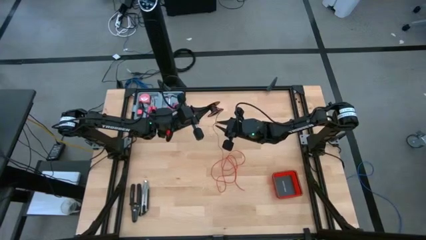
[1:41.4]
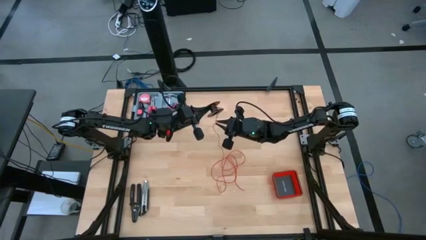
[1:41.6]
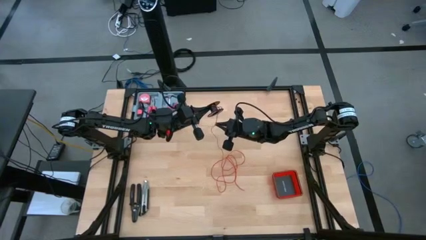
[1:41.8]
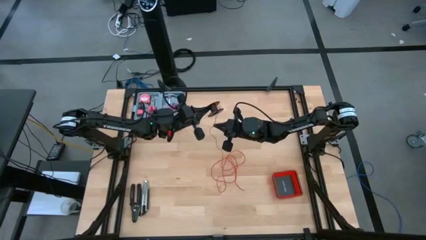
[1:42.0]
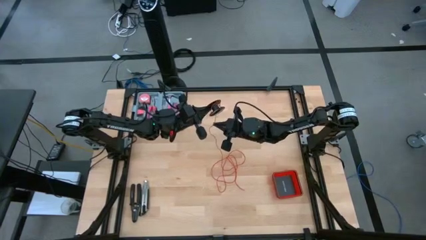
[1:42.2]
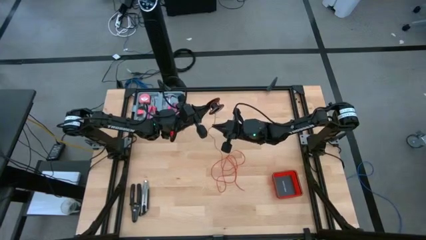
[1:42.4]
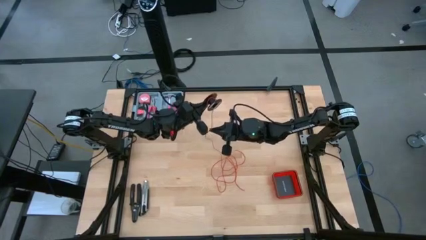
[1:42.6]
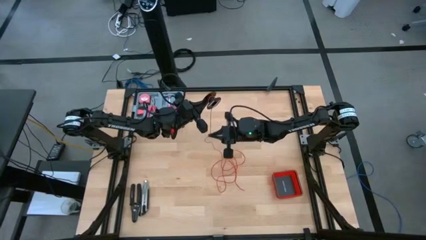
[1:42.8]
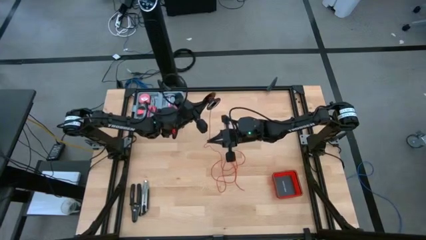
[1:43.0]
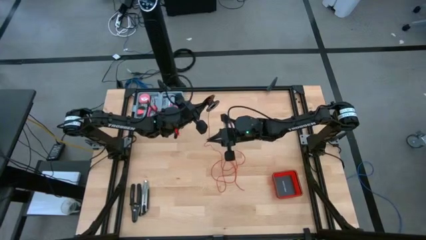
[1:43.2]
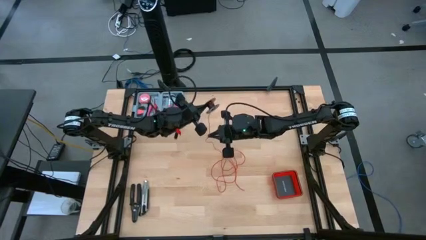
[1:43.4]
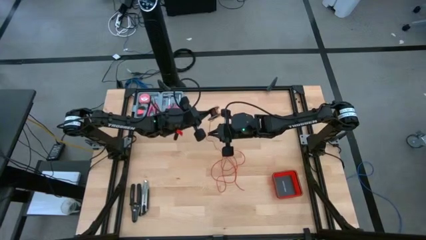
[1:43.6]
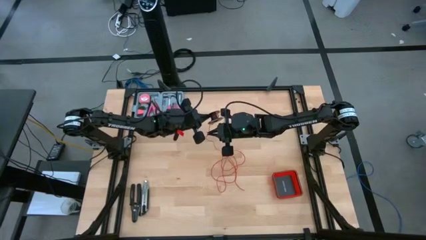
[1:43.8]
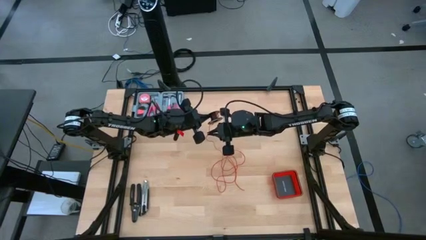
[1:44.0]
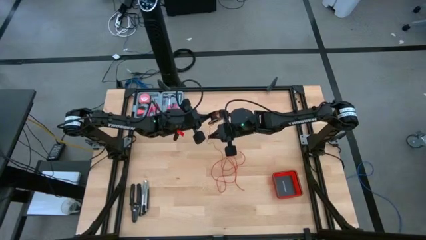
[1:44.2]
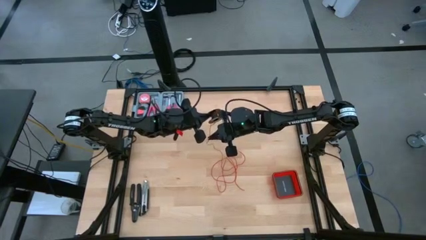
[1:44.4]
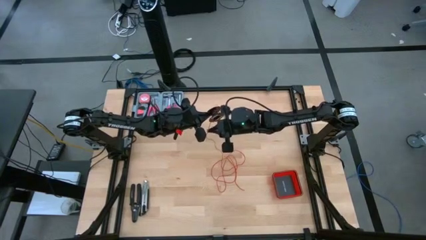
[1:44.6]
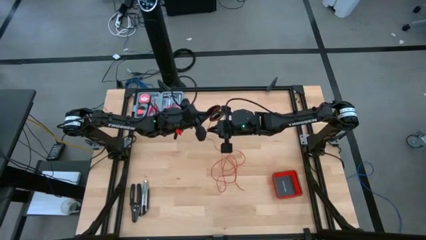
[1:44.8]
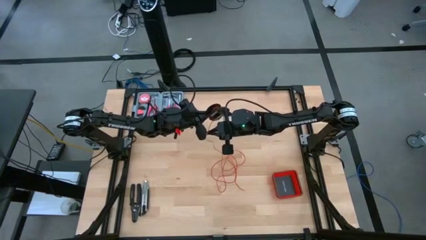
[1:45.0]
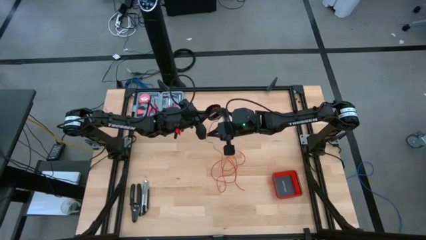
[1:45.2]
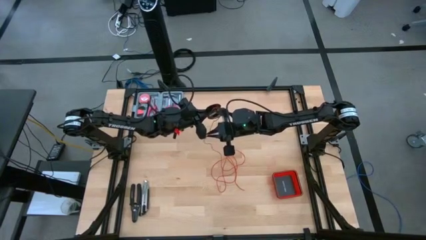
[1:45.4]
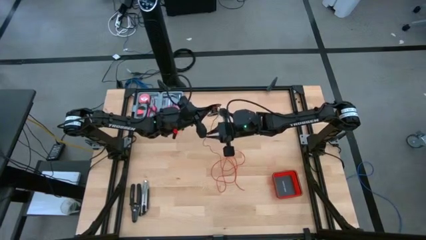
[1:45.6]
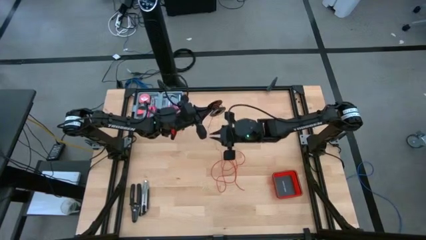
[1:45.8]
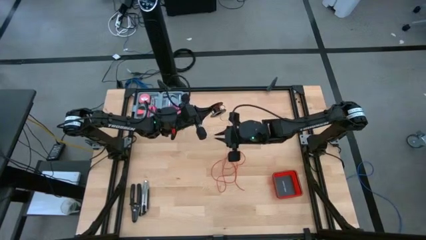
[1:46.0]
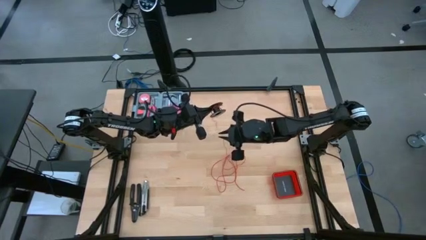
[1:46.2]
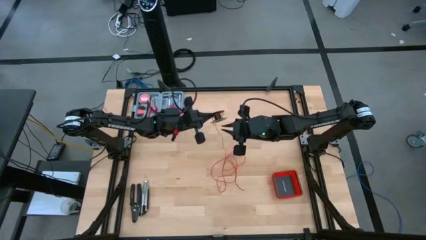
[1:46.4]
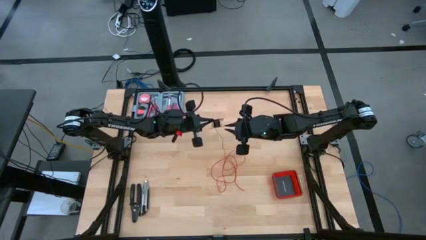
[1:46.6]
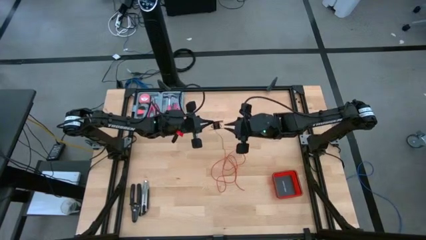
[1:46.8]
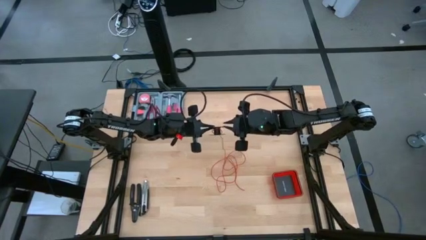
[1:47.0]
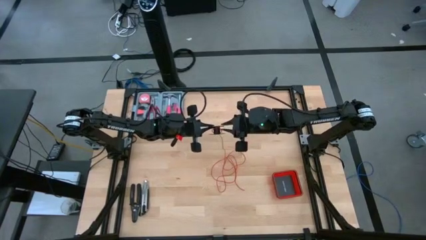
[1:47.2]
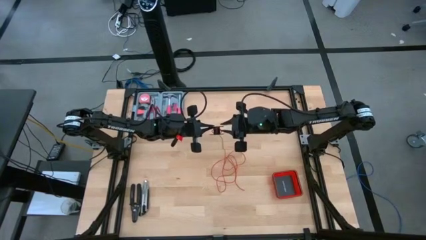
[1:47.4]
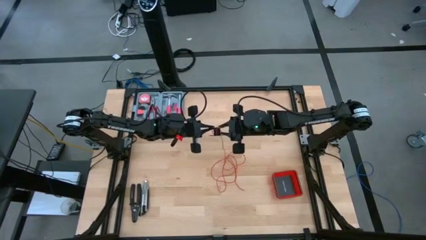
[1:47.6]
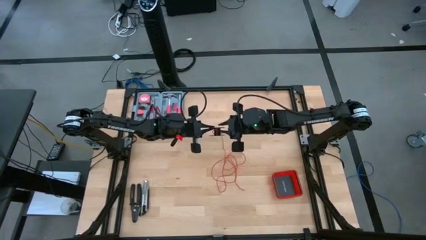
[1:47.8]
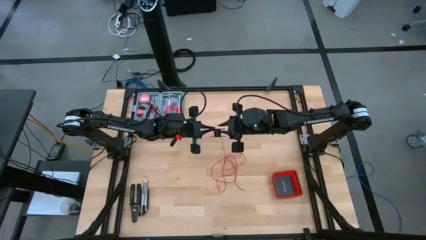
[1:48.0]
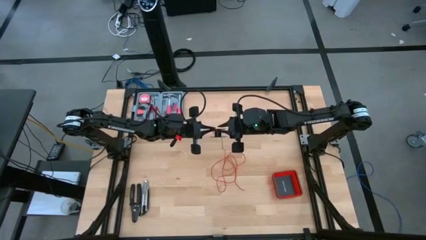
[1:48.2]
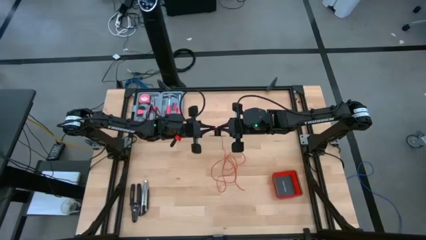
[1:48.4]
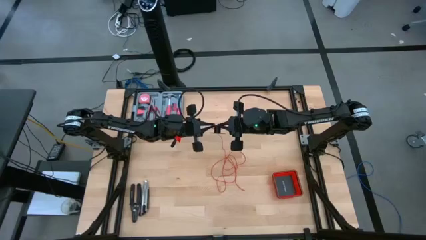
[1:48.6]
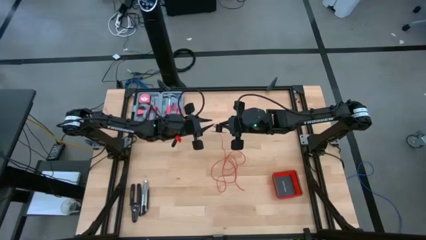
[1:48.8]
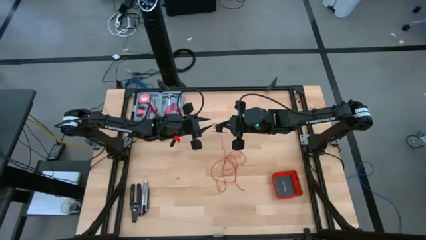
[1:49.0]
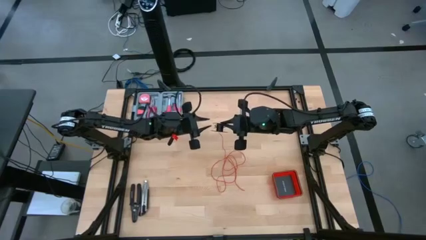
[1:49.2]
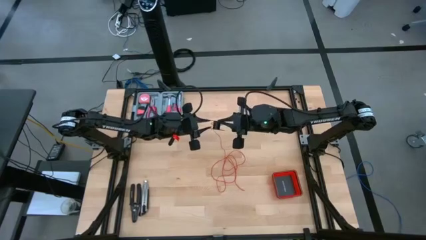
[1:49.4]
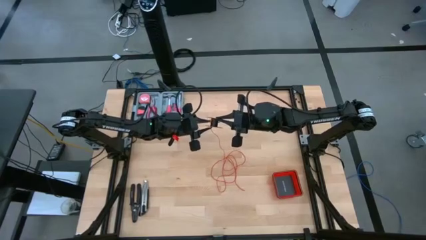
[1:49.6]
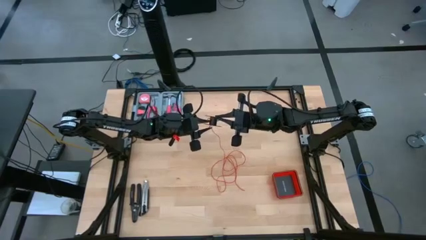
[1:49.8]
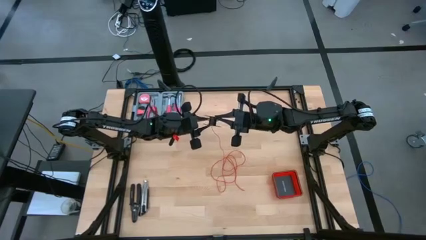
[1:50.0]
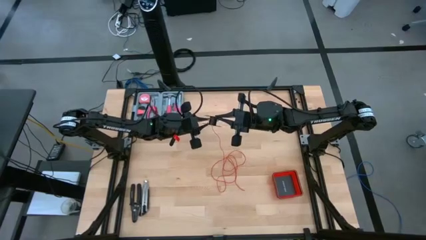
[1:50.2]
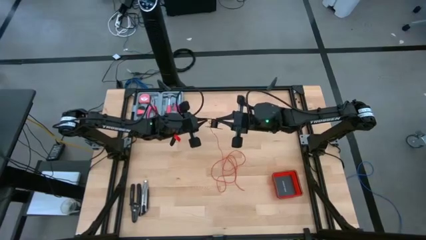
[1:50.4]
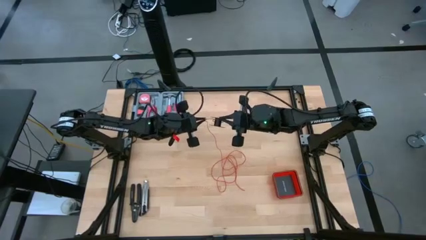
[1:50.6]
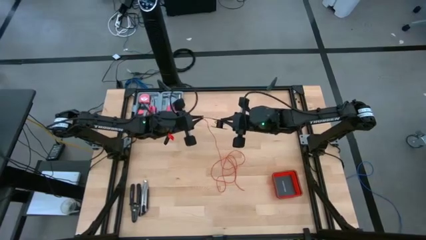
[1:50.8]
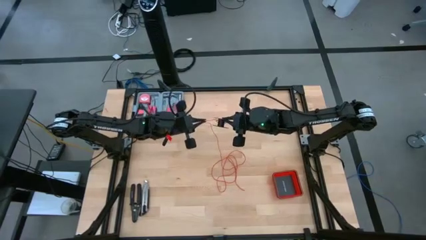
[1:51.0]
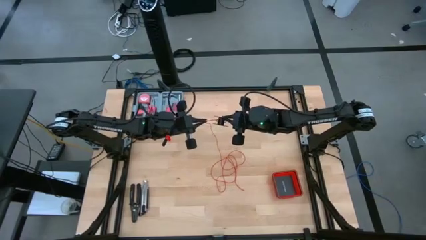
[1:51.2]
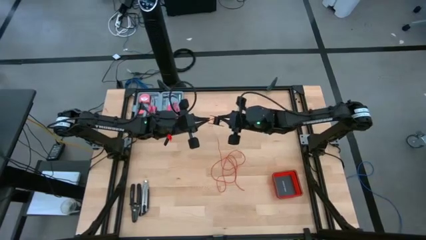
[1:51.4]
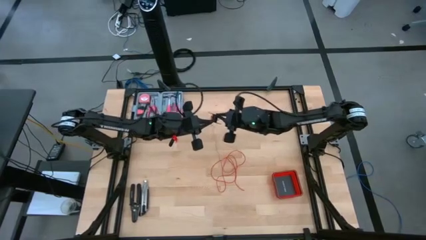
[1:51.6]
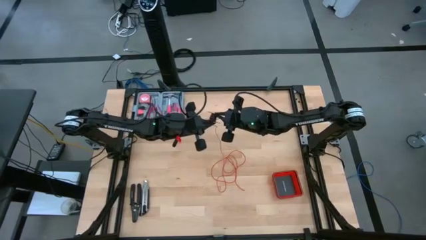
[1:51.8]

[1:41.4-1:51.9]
Task: Coil cords
Coil the red wire onto the spool

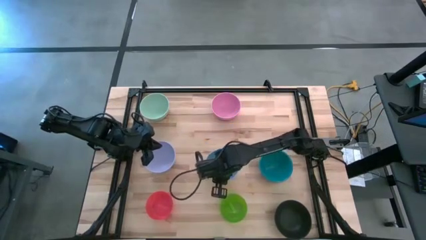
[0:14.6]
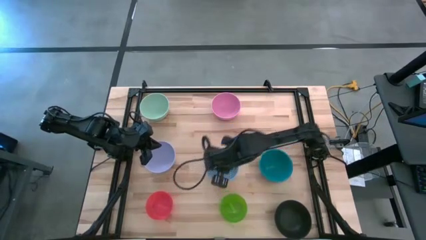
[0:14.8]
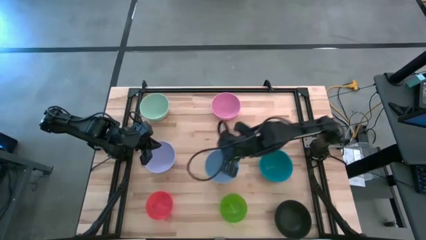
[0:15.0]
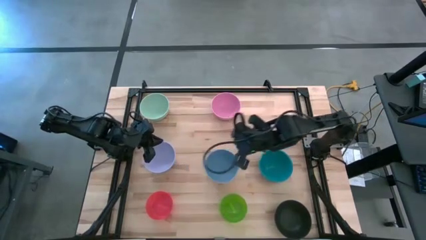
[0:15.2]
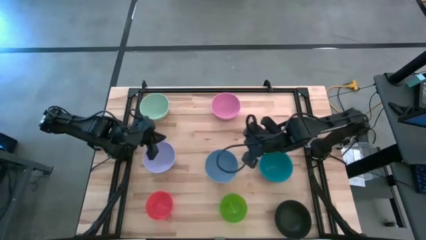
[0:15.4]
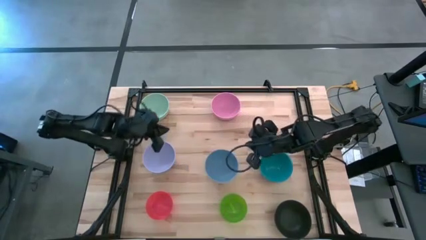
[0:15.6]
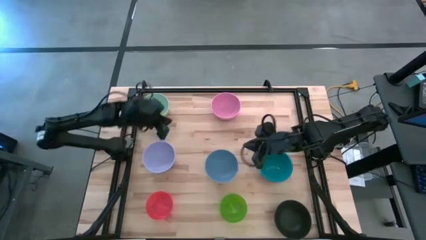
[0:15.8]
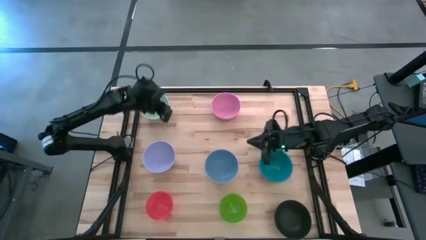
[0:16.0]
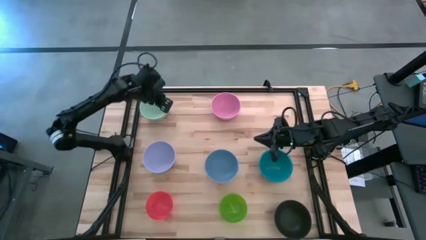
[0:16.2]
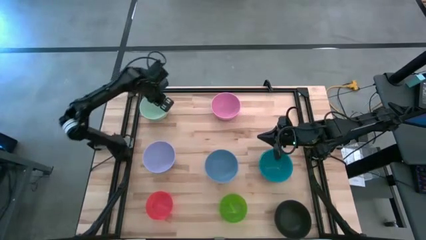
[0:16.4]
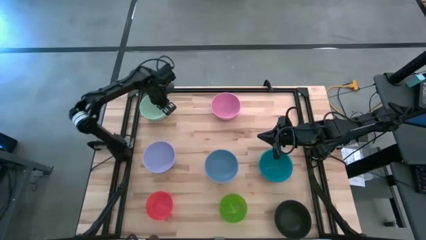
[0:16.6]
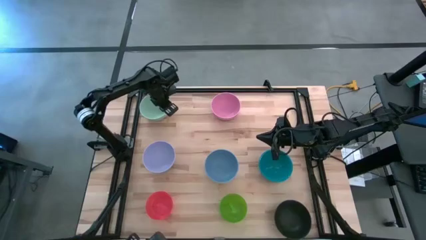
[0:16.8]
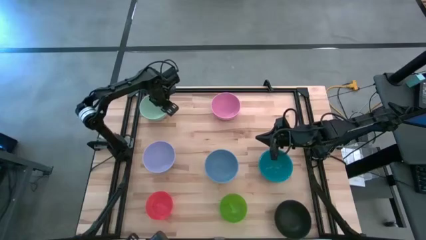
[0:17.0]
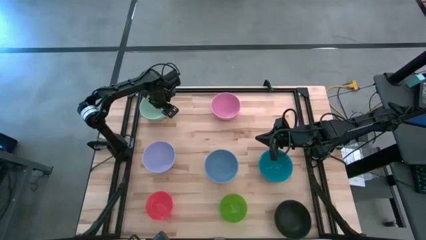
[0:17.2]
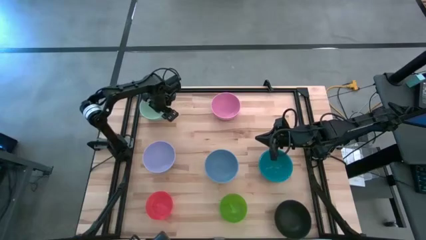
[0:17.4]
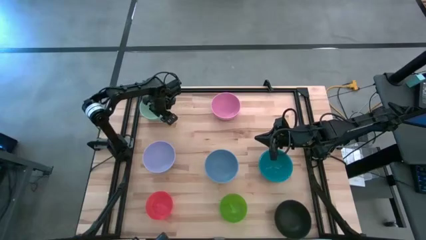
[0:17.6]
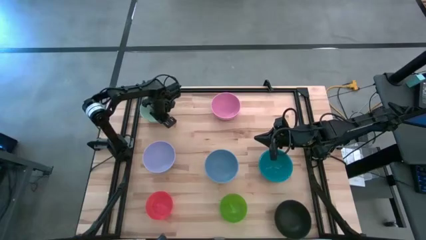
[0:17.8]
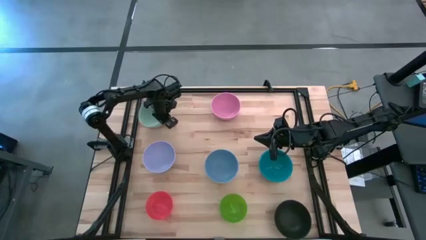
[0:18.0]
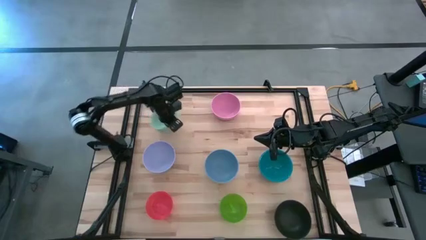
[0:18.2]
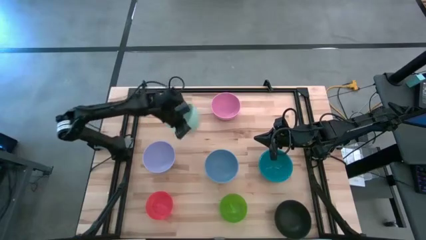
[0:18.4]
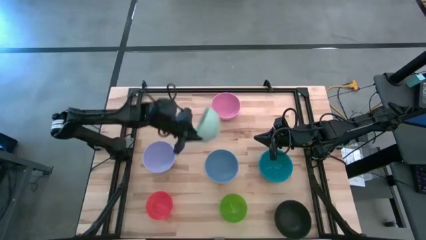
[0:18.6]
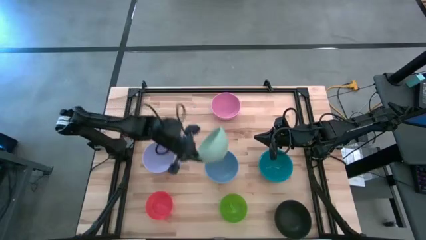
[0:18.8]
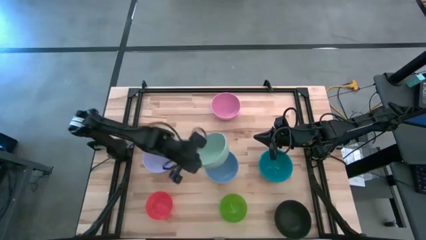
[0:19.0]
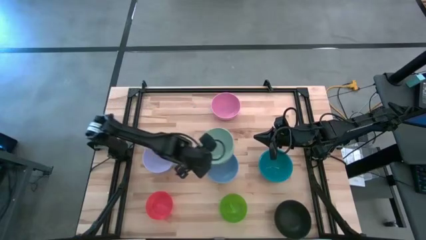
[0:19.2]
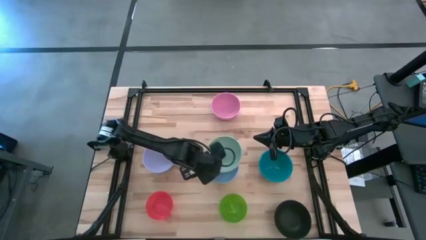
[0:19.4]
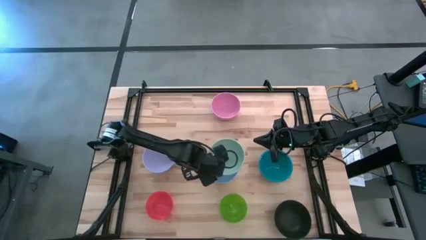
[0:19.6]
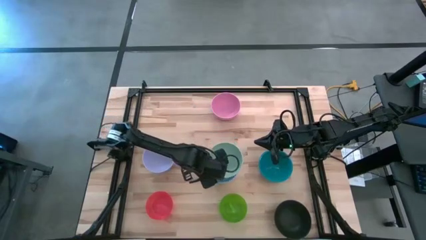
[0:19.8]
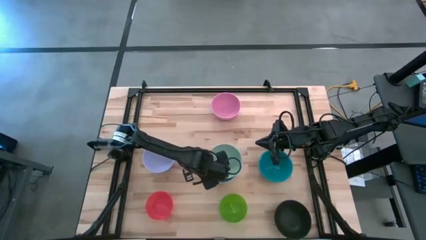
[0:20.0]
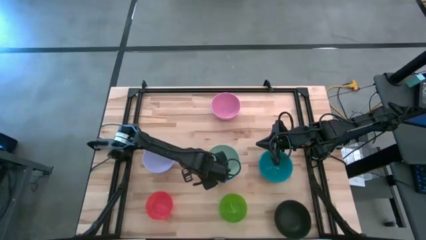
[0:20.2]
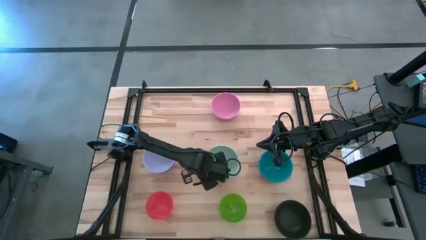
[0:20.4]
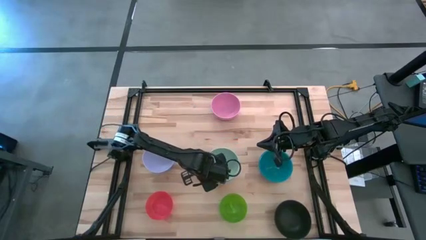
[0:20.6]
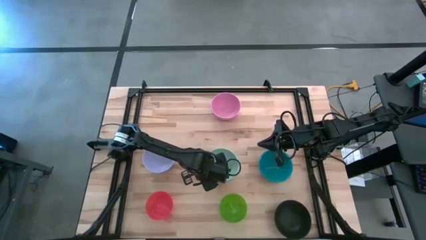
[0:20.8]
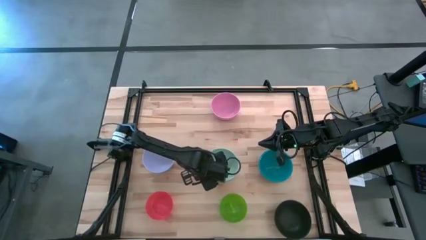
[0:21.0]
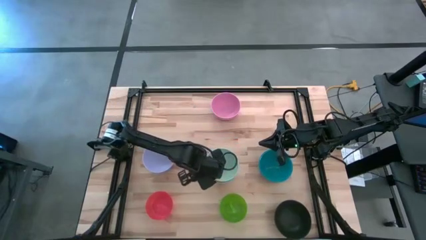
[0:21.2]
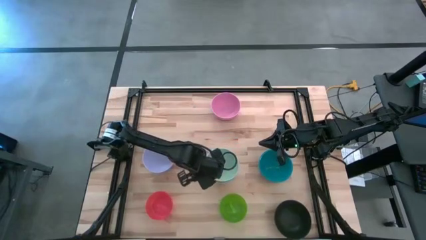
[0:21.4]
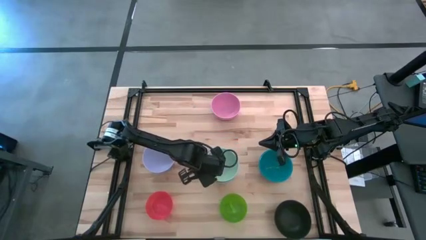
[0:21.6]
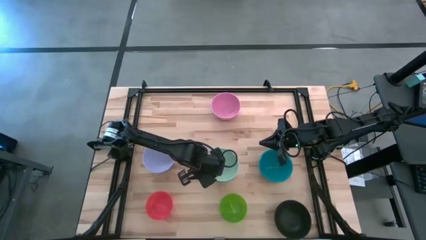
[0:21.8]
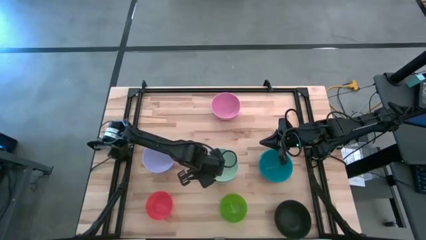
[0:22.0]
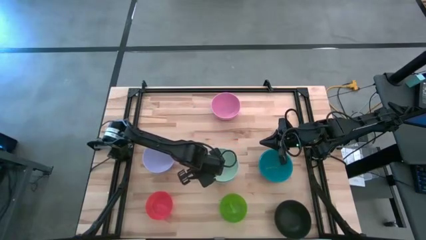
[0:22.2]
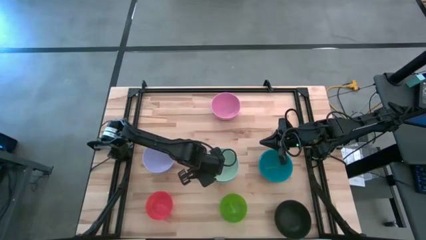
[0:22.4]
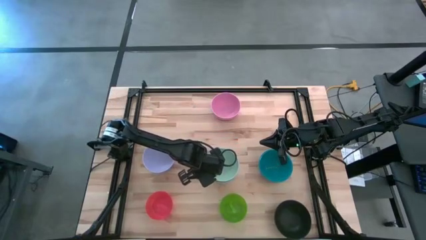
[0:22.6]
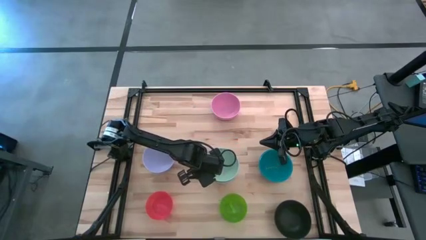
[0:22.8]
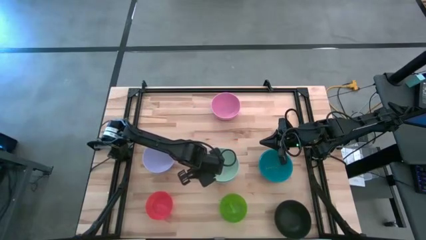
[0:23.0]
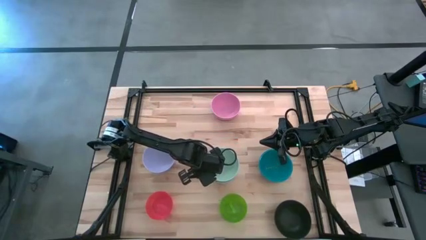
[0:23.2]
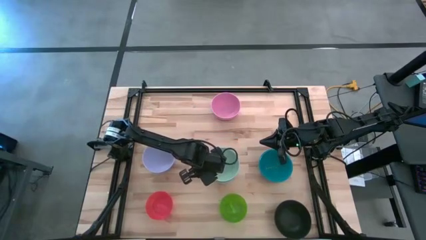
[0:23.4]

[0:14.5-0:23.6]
Task: Nest bowls inside each other
Stack the light green bowl on top of the light blue bowl
